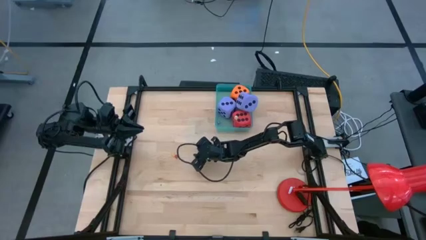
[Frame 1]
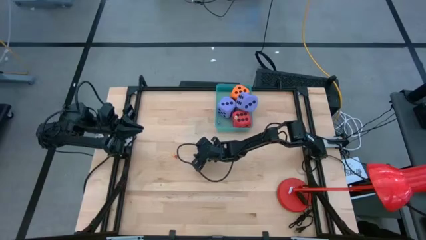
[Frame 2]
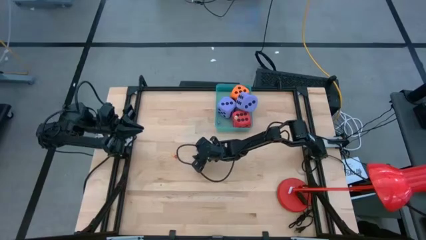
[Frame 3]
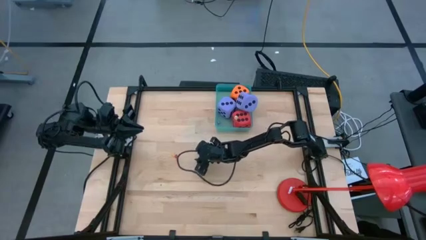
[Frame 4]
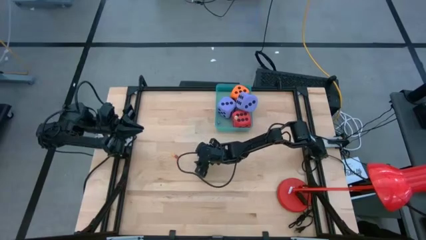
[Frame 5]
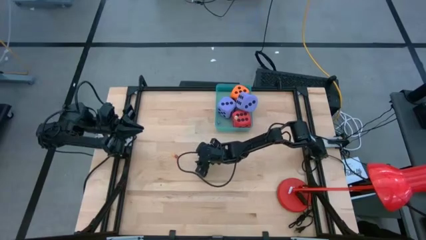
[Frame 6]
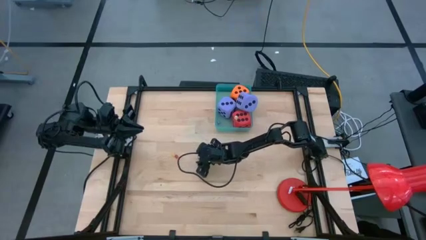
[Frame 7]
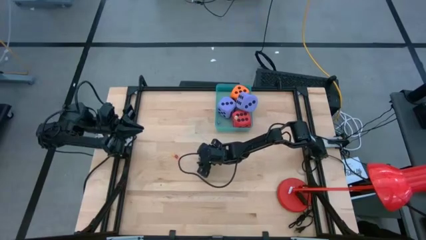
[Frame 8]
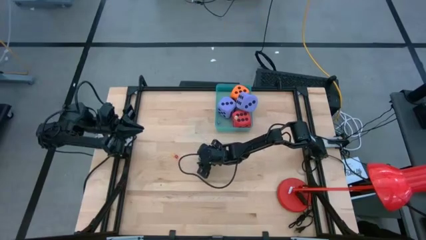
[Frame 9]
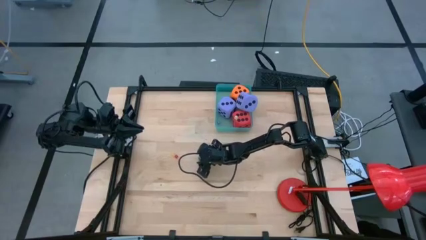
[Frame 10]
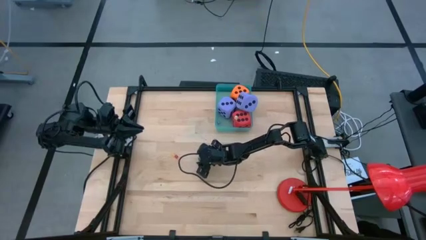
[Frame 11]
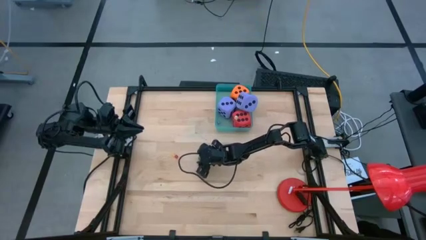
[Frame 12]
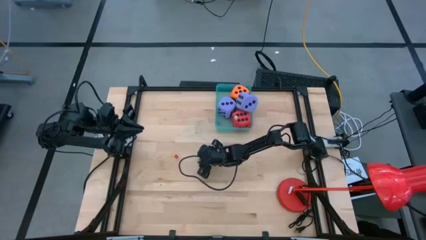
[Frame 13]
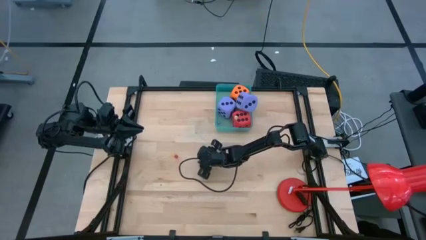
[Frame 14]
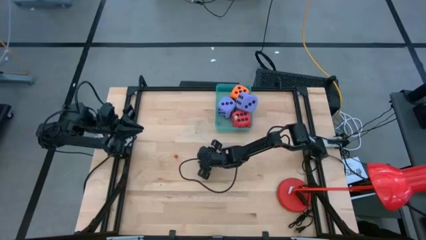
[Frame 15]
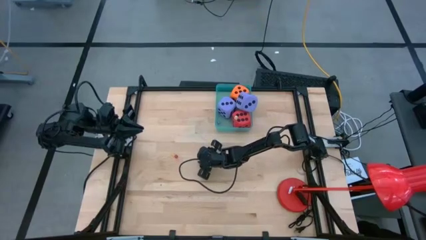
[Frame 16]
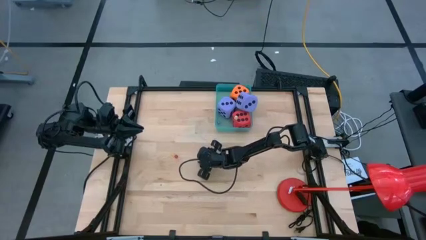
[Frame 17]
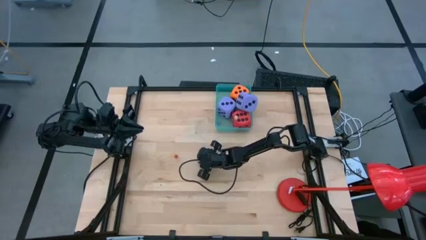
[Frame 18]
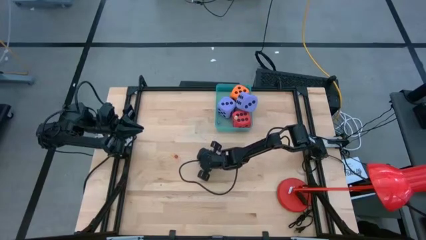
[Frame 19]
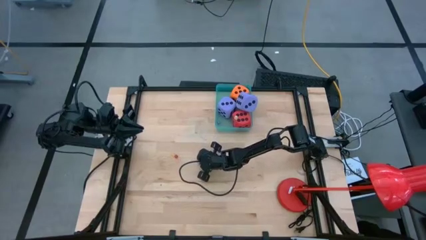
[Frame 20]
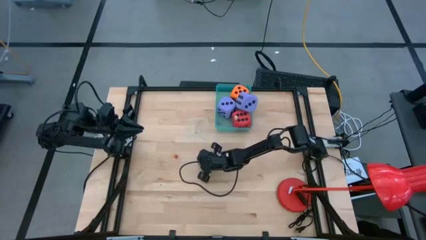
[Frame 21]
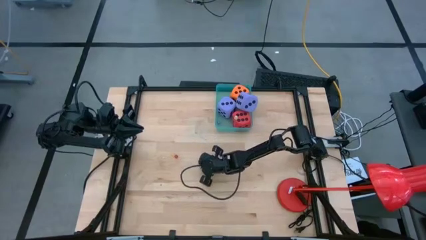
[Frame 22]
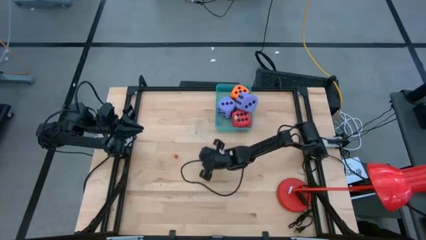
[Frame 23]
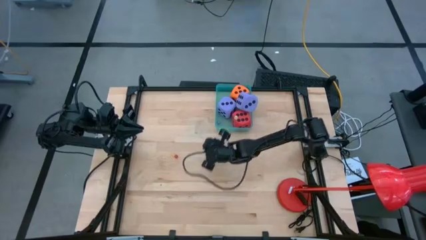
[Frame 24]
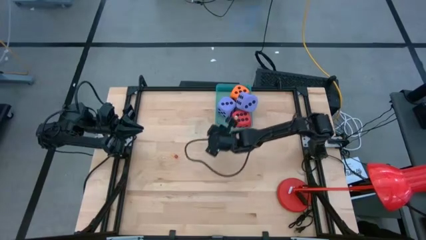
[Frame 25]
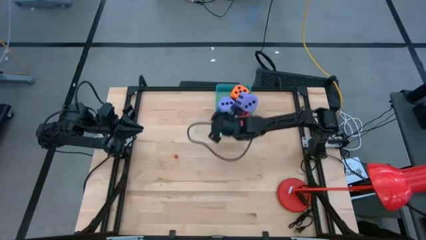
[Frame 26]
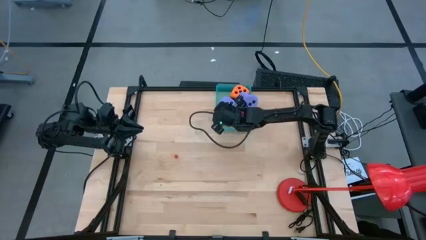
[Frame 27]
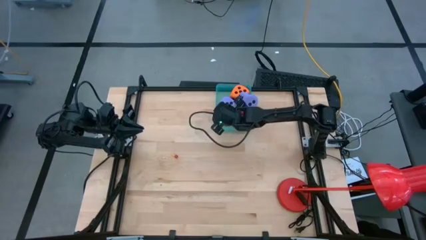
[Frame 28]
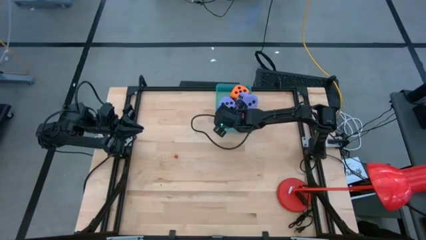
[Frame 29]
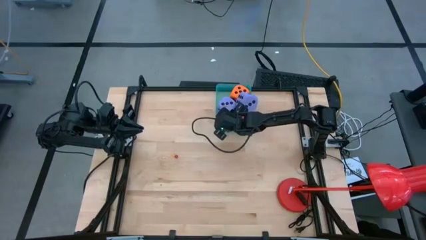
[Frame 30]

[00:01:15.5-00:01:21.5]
Task: Pick & Place Dice
Put the green die into the green bin

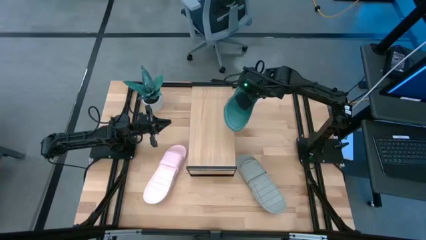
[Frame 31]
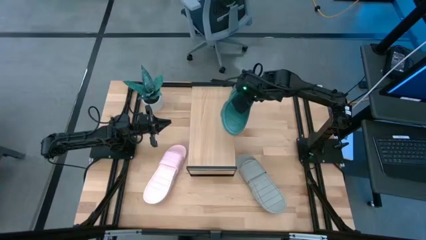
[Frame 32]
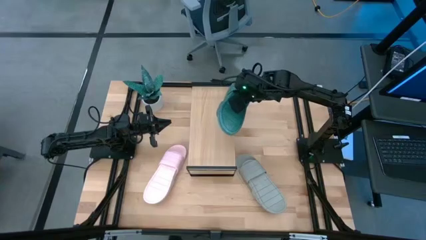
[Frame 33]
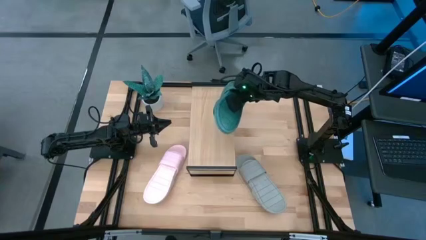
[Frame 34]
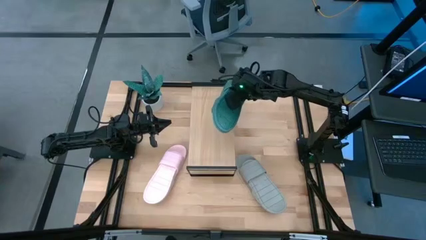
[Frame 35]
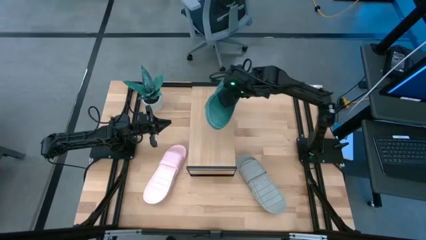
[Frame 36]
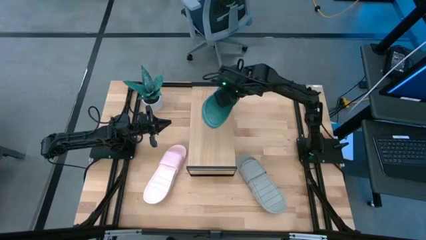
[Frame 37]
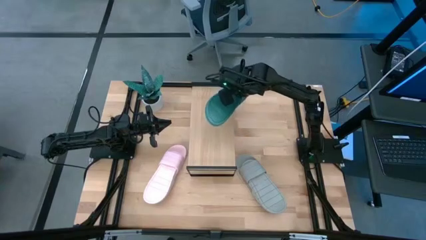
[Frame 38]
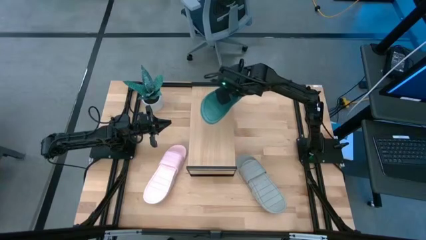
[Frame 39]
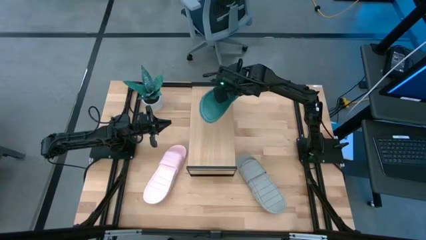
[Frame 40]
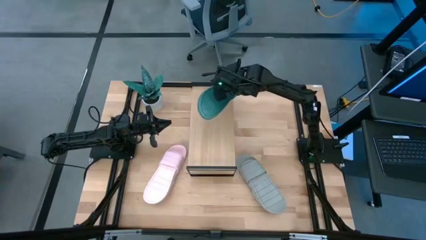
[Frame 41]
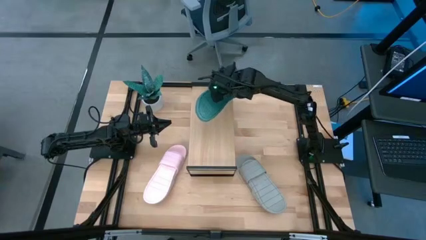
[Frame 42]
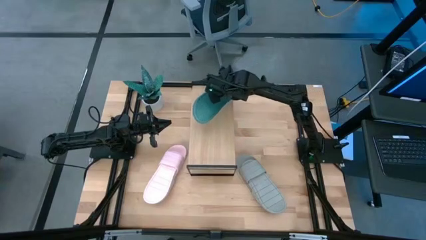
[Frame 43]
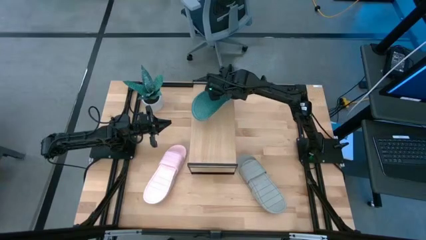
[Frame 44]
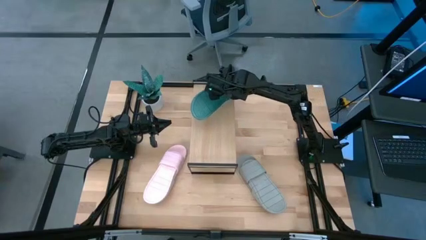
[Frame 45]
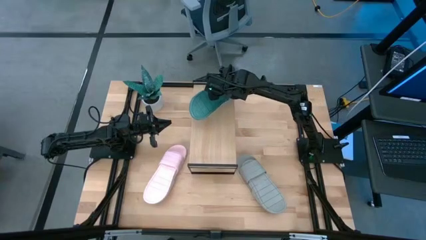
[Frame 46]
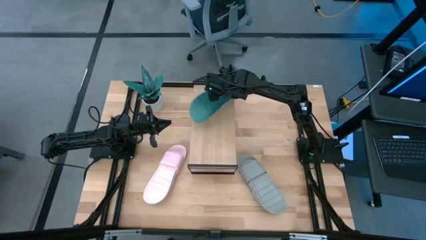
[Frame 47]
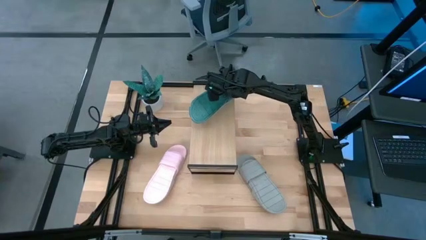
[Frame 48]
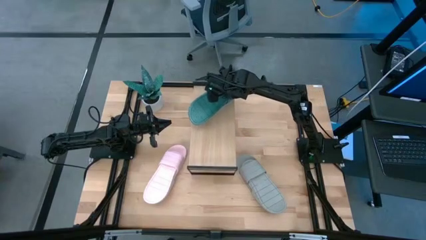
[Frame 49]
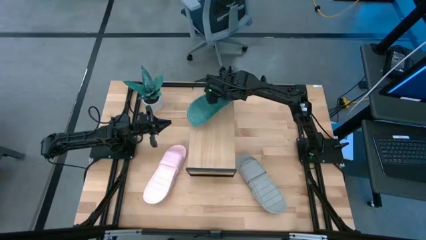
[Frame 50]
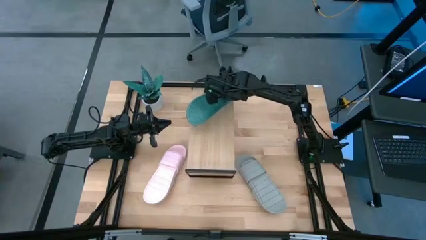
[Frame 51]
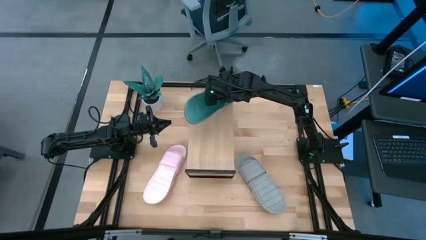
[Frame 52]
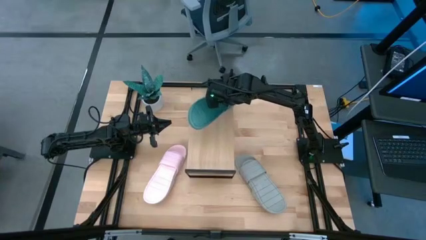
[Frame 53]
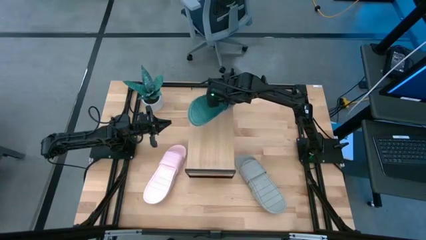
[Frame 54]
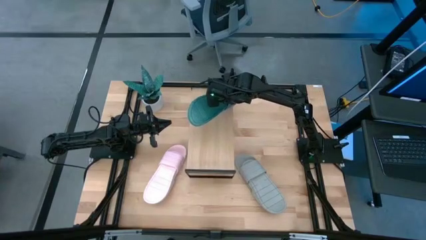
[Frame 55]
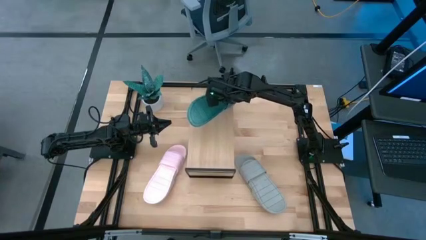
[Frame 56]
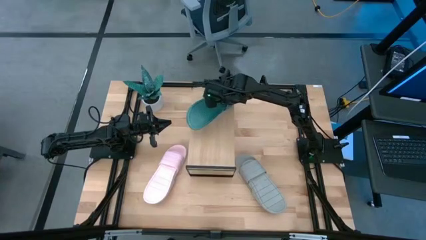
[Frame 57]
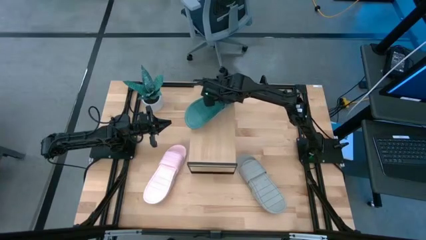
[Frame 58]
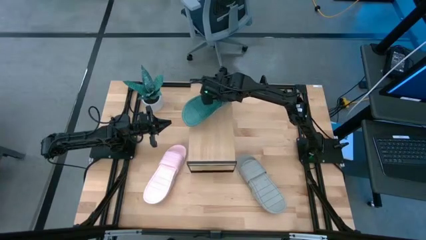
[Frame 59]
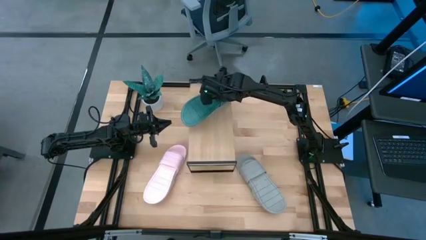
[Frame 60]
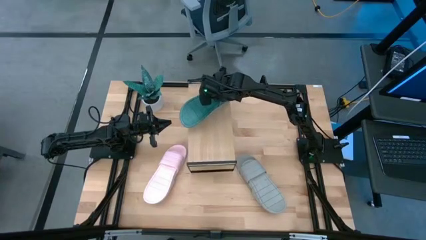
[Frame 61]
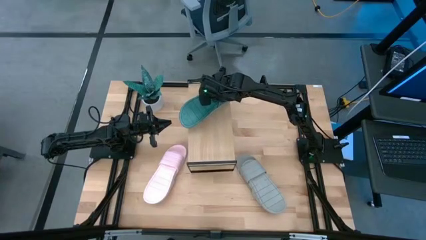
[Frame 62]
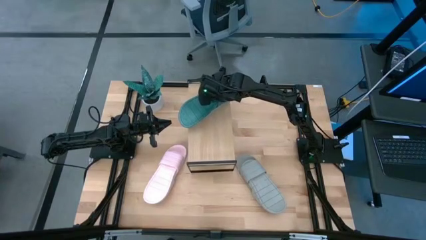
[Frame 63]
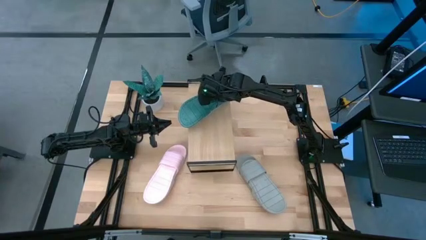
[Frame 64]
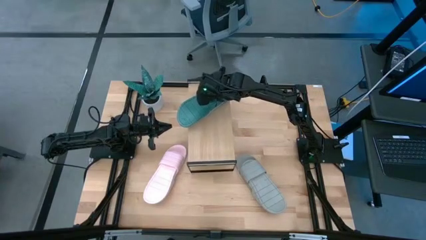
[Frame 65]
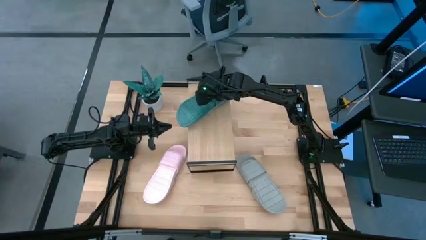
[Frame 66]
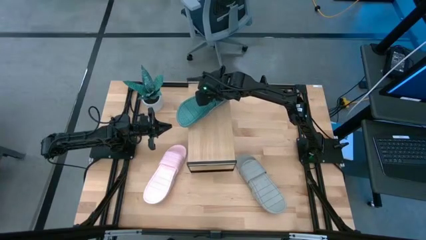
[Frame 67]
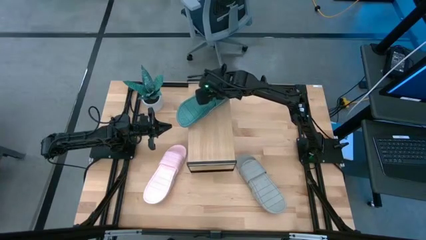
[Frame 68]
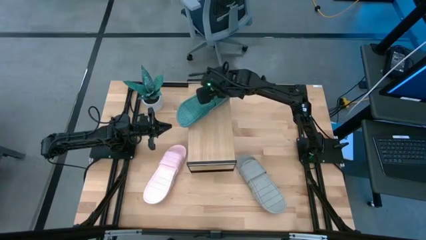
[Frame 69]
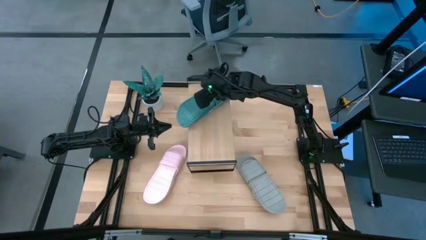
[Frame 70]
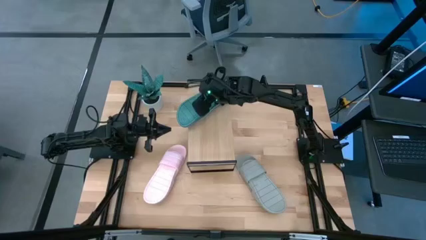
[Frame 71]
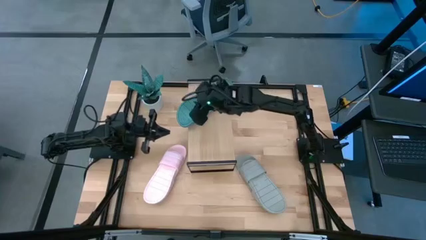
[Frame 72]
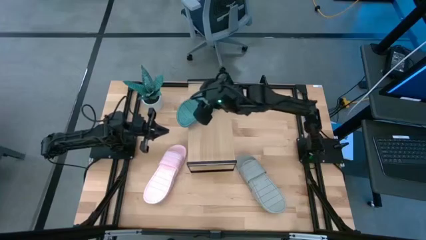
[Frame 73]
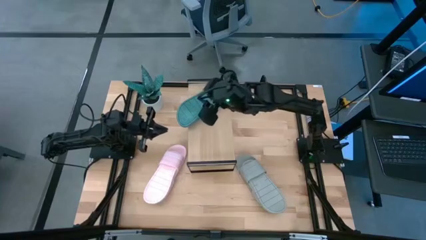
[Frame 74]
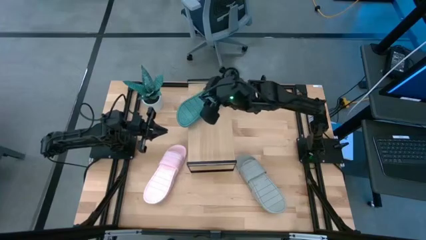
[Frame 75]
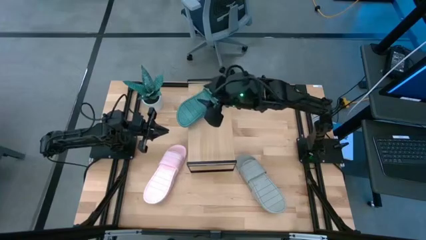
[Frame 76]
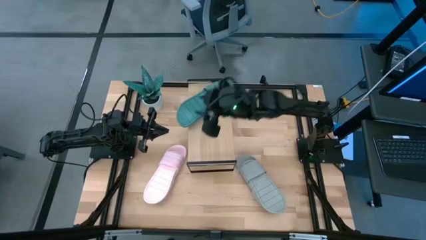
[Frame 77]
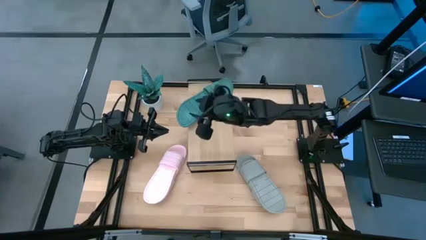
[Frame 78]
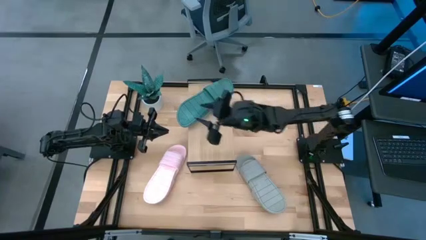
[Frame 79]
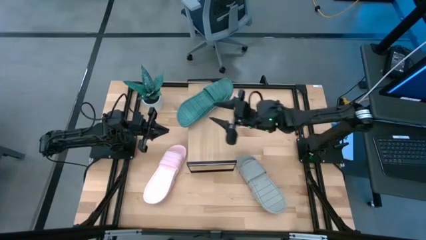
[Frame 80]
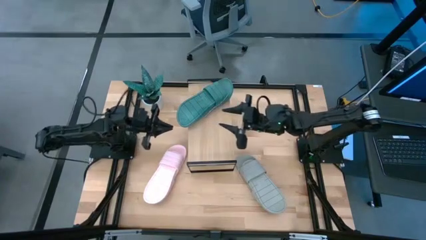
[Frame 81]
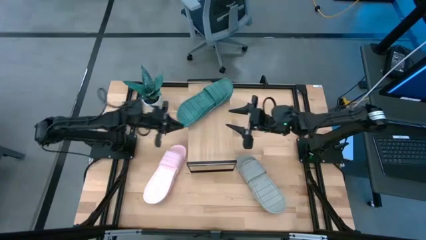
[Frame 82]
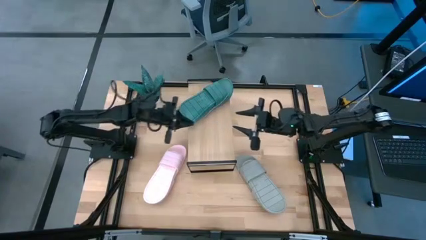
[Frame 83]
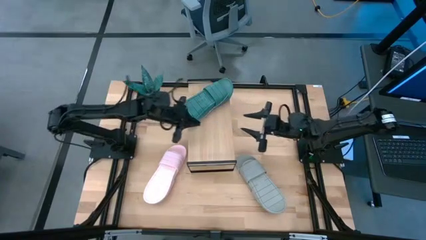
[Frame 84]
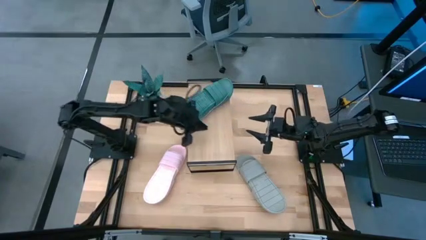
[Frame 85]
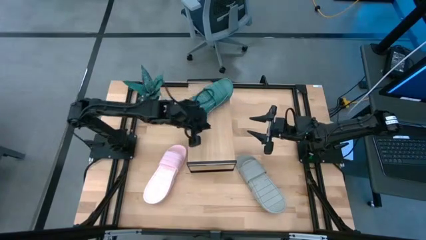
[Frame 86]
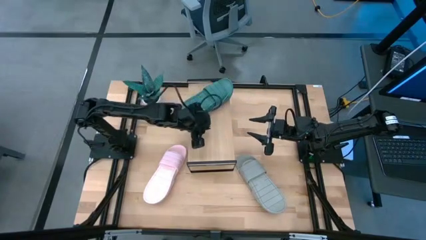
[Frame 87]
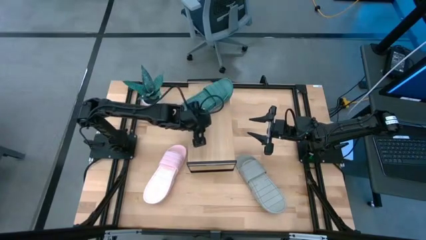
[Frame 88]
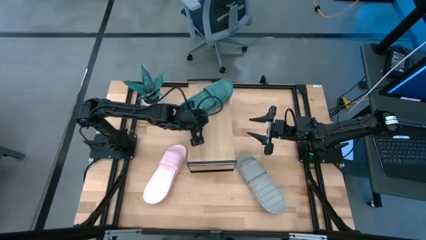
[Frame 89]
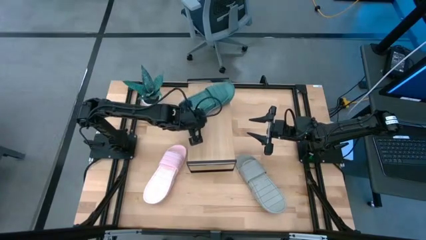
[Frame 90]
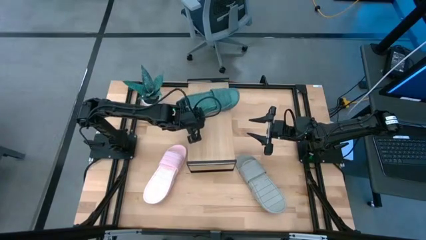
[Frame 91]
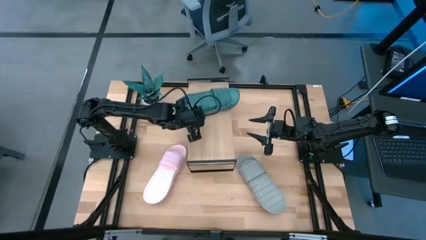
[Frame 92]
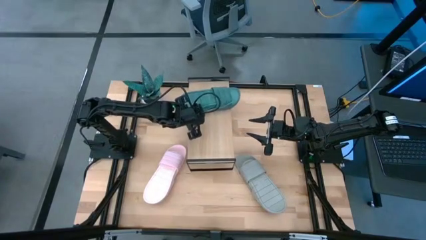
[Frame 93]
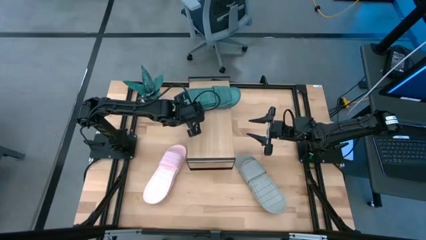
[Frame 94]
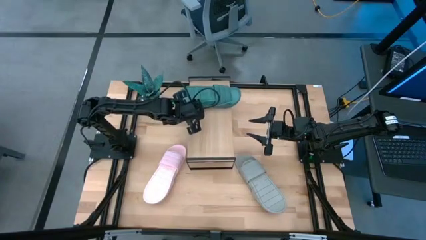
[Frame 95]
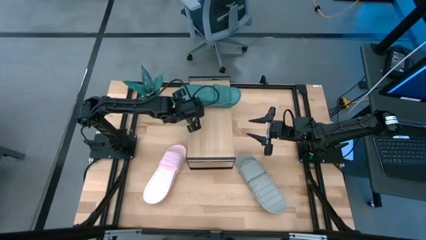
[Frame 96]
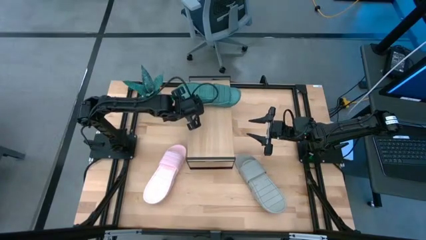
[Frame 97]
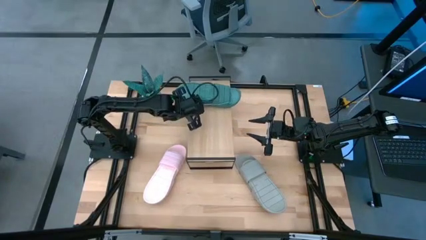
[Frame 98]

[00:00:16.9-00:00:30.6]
Task: Pick and place slippers onto the shelf
Put the green pair of slippers on the shelf
